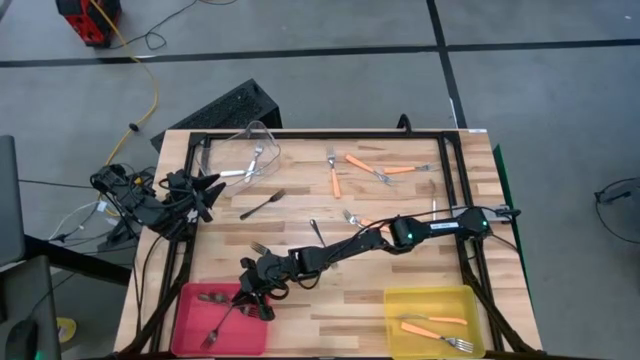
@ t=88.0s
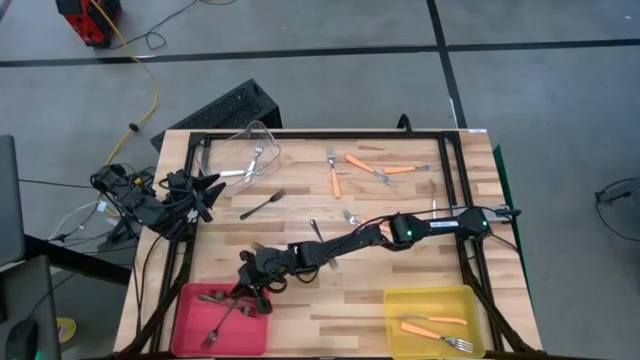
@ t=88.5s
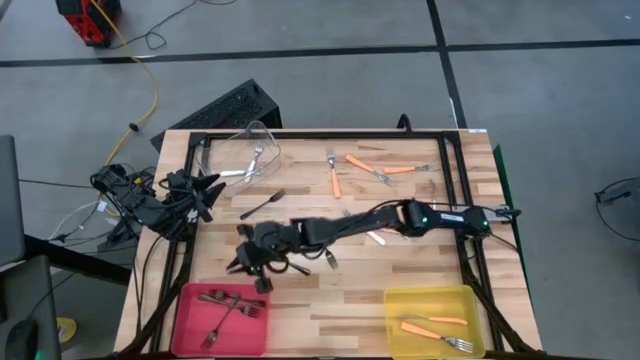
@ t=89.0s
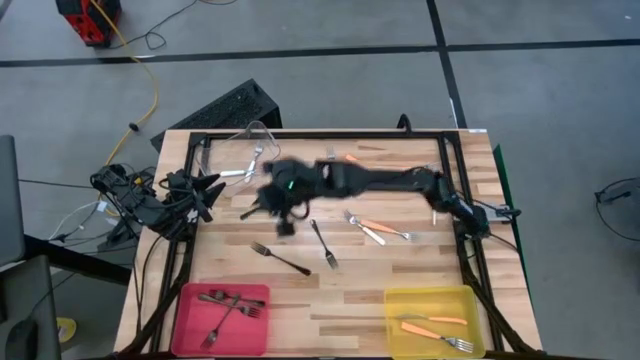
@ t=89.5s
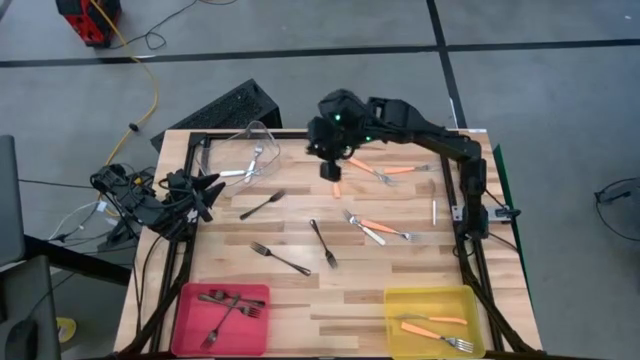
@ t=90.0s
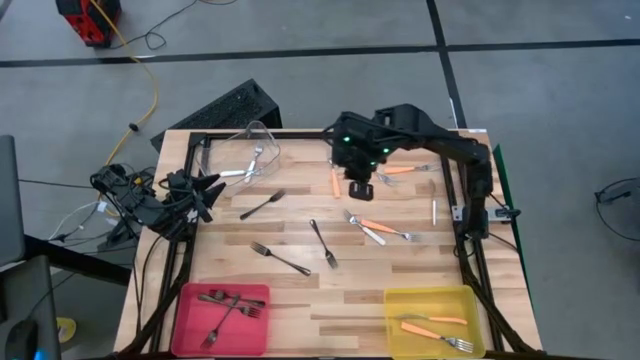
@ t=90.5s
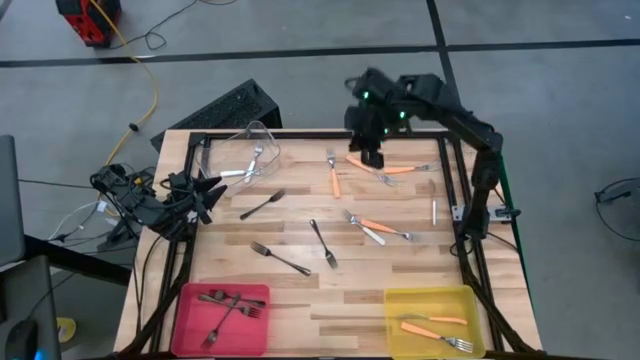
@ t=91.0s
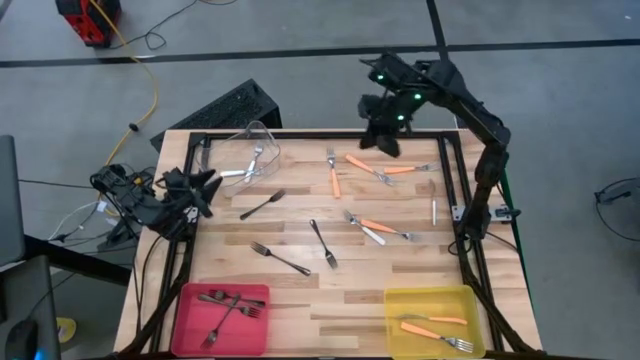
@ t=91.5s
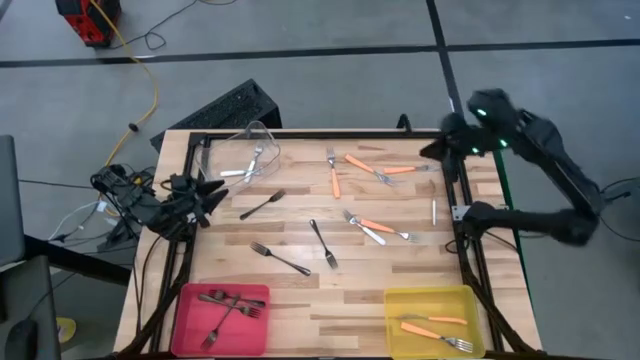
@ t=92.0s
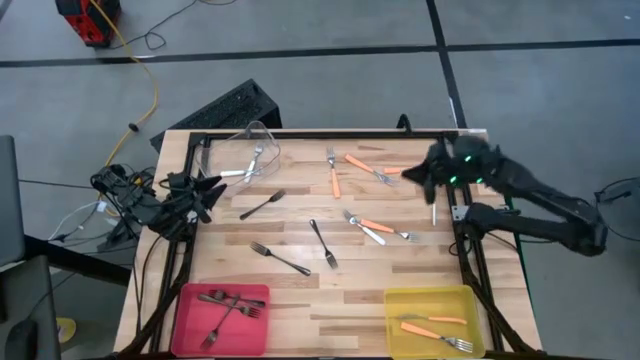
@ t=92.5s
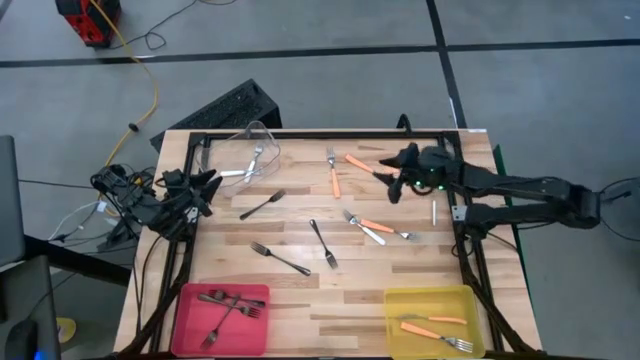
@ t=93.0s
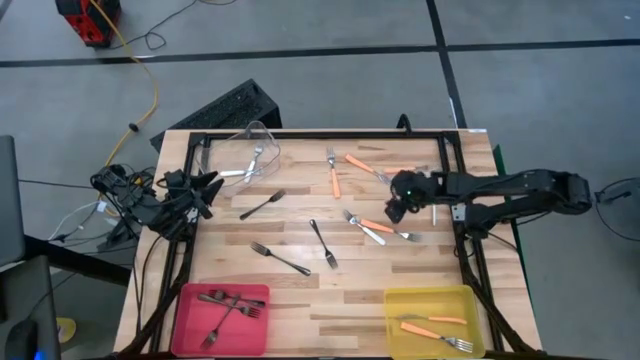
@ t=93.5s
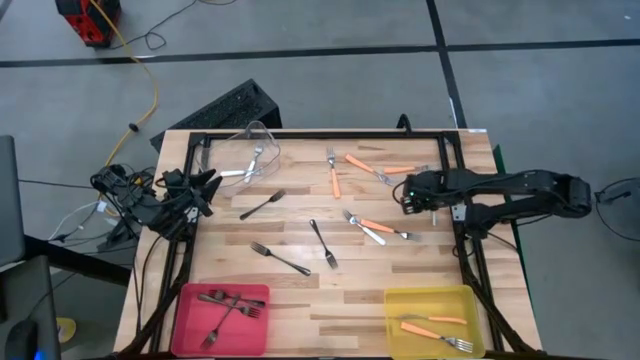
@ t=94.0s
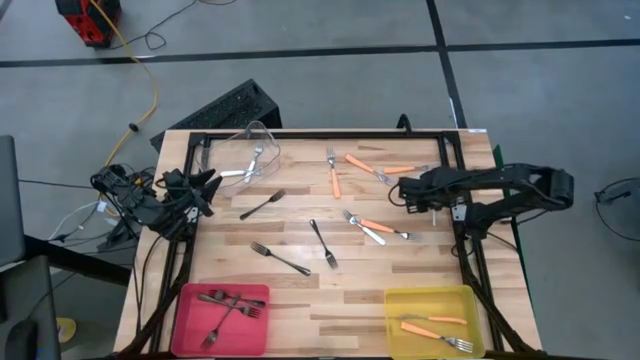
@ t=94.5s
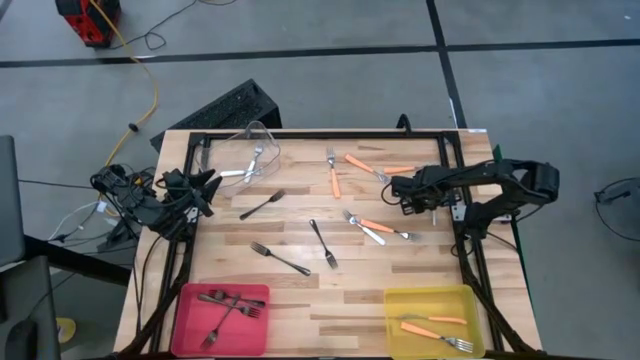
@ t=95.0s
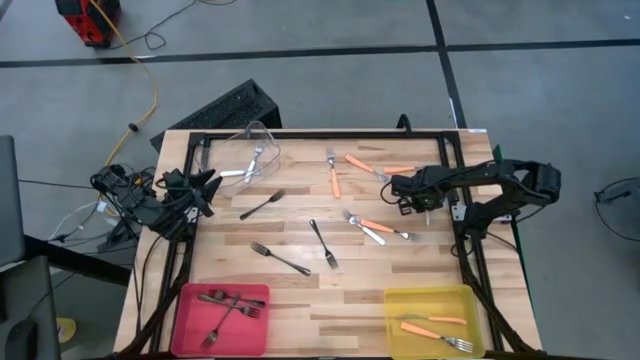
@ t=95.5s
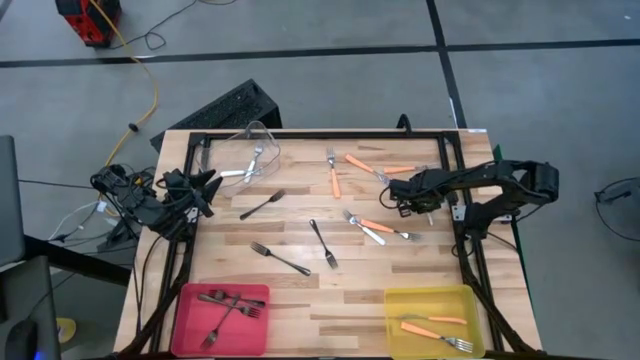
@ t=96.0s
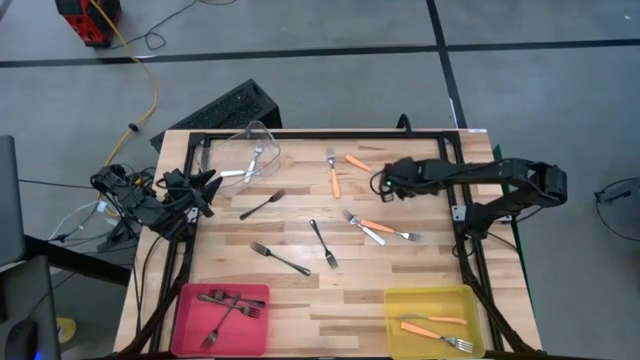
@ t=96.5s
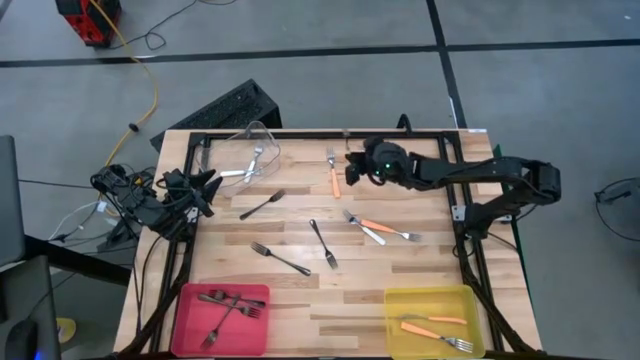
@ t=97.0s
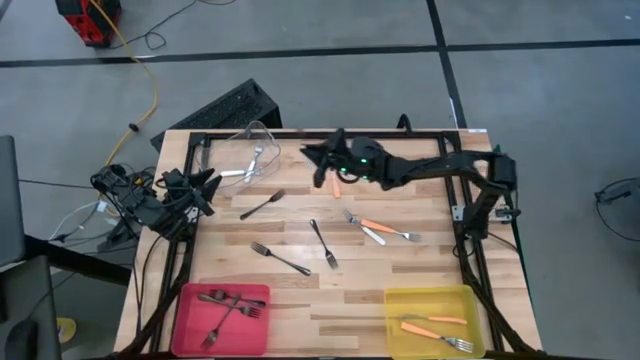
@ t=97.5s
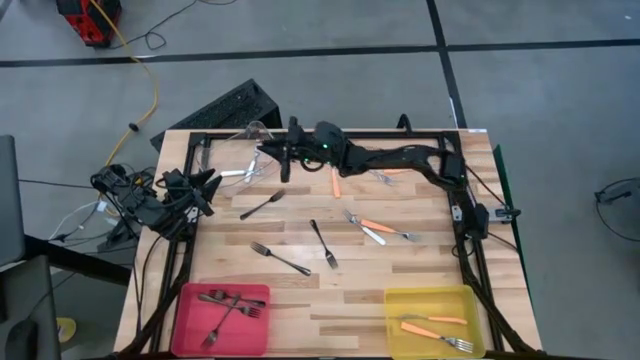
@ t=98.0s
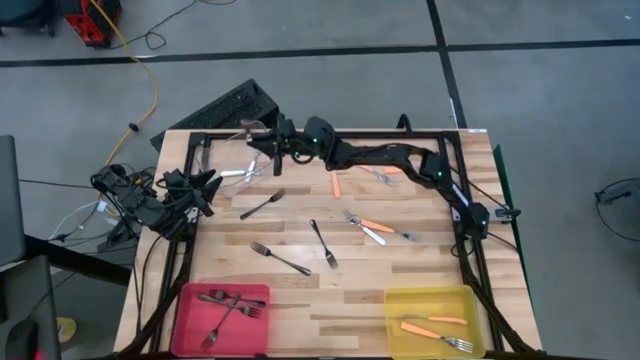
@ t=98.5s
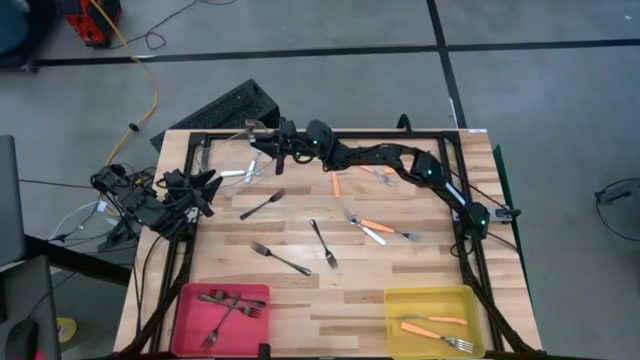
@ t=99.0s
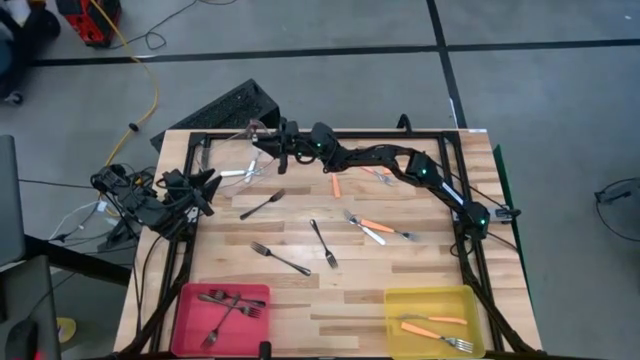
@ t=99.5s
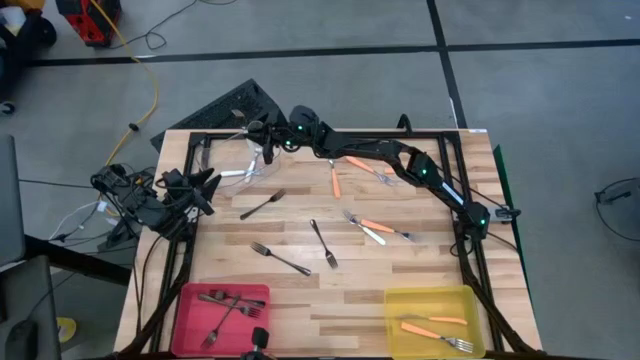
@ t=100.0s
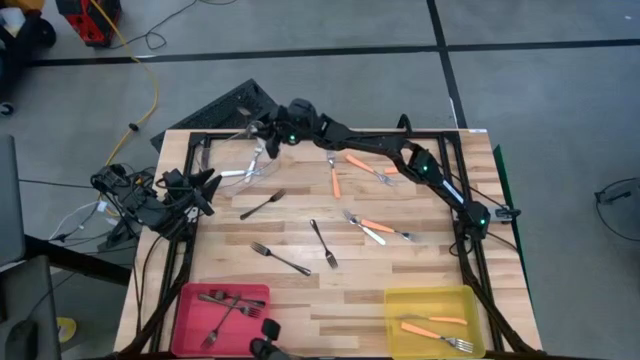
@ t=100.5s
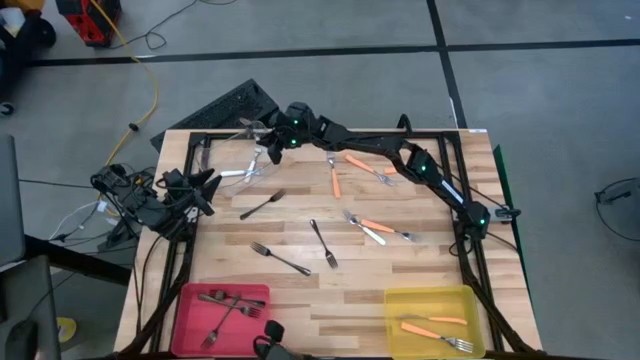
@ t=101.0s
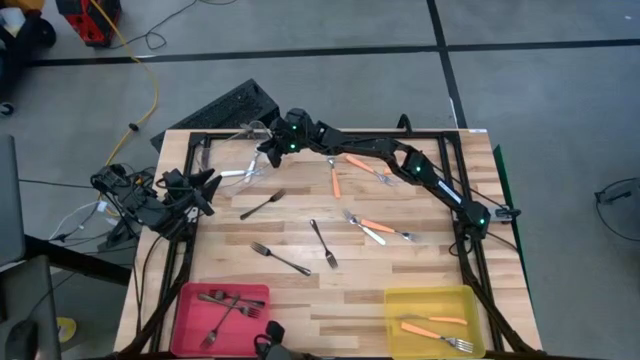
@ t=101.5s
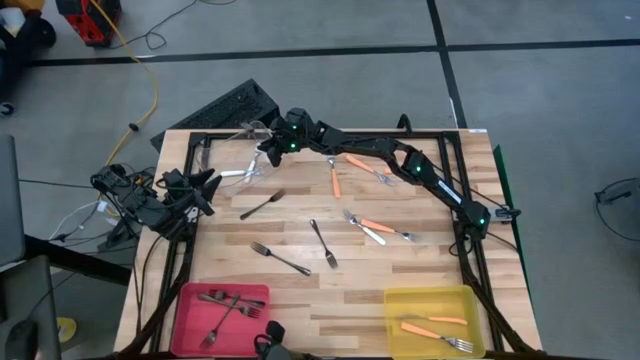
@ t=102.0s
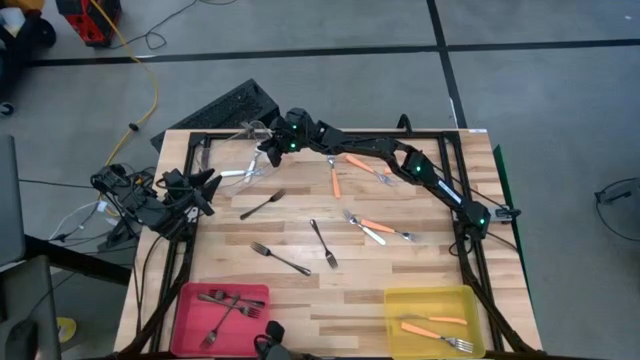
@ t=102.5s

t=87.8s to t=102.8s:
Task: Sort silverware by color (type)
Put the white fork into the transparent bin

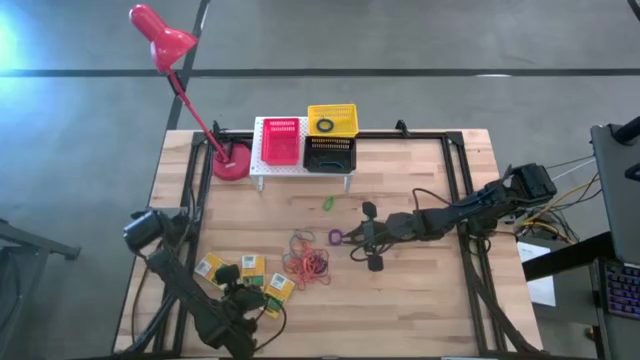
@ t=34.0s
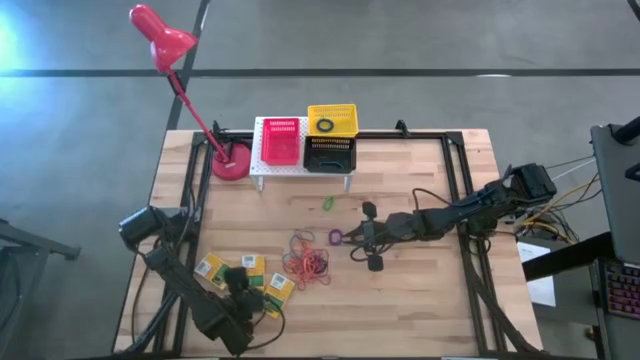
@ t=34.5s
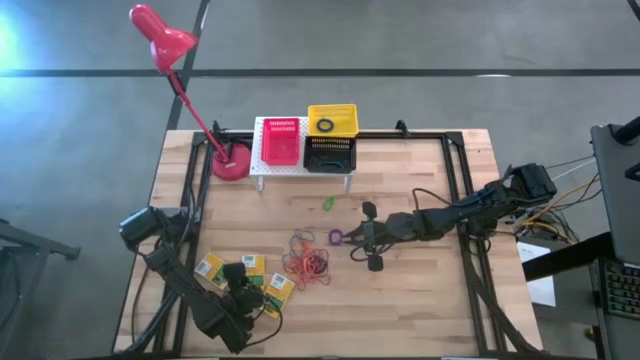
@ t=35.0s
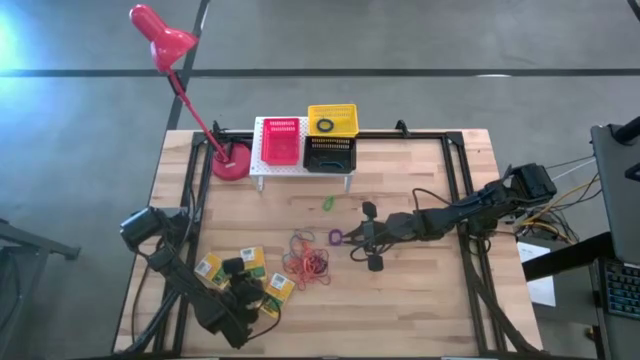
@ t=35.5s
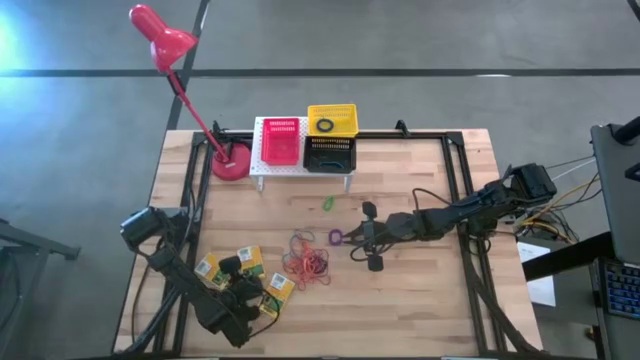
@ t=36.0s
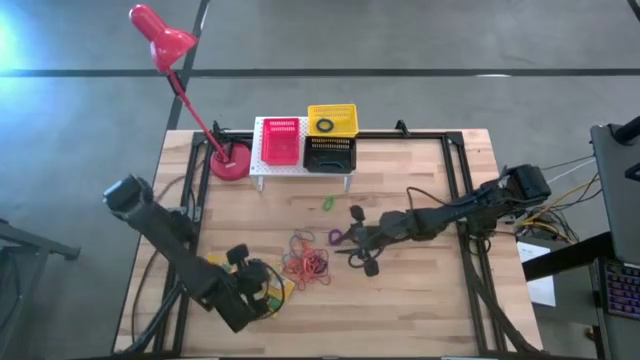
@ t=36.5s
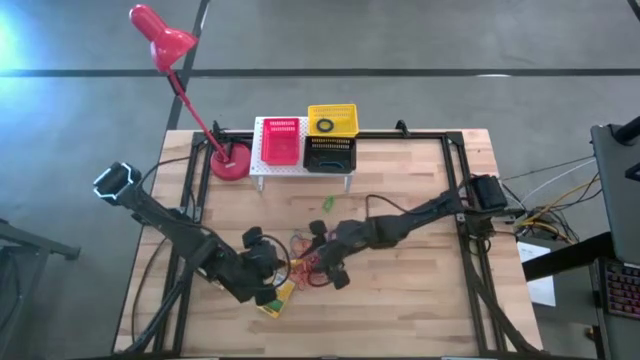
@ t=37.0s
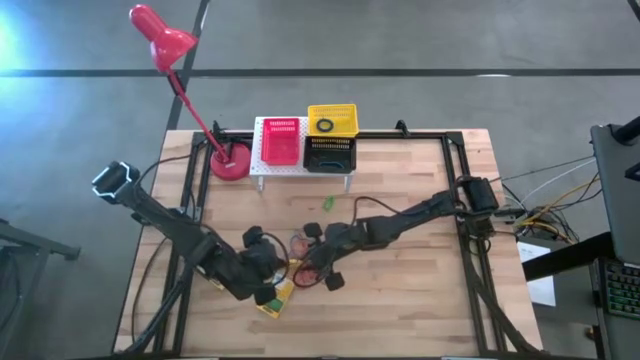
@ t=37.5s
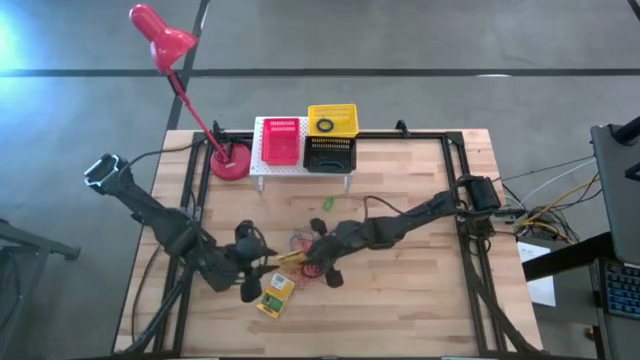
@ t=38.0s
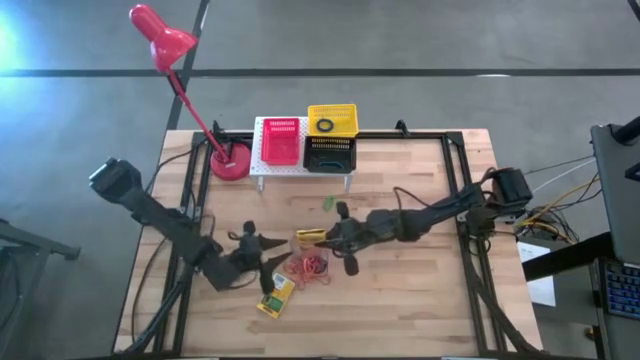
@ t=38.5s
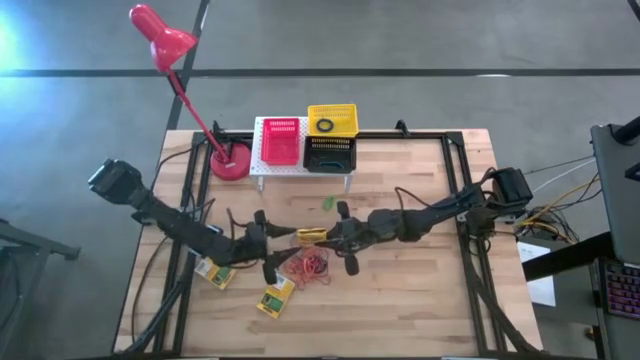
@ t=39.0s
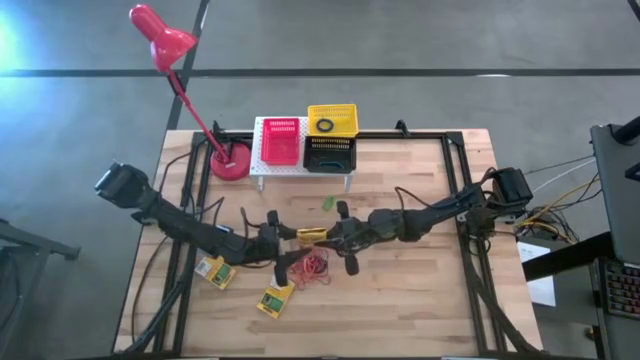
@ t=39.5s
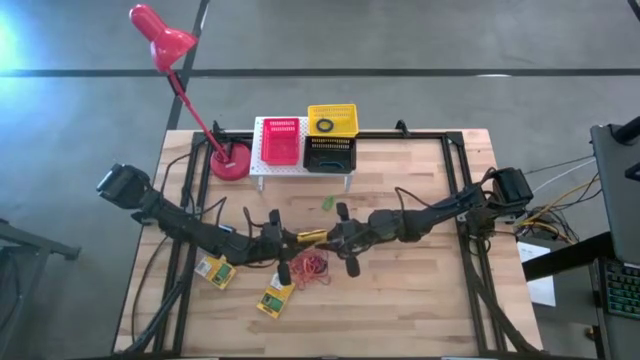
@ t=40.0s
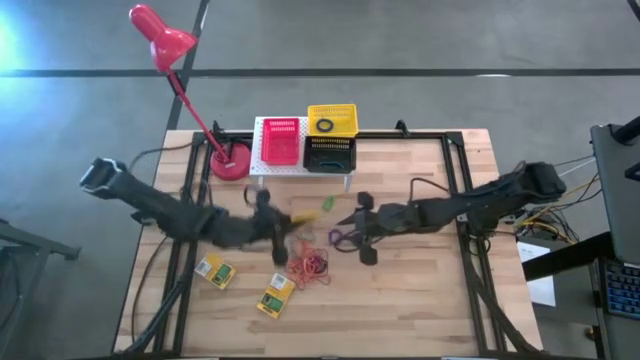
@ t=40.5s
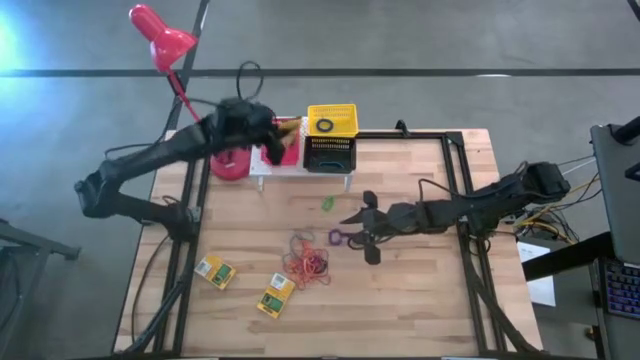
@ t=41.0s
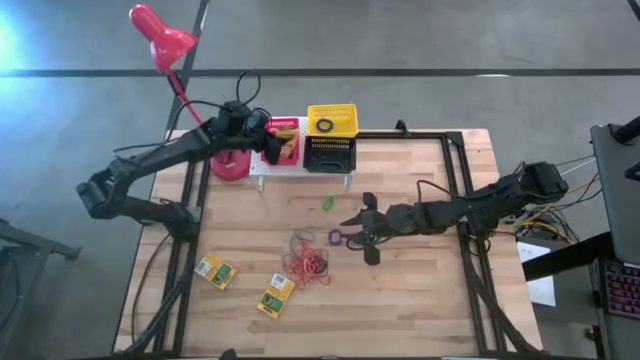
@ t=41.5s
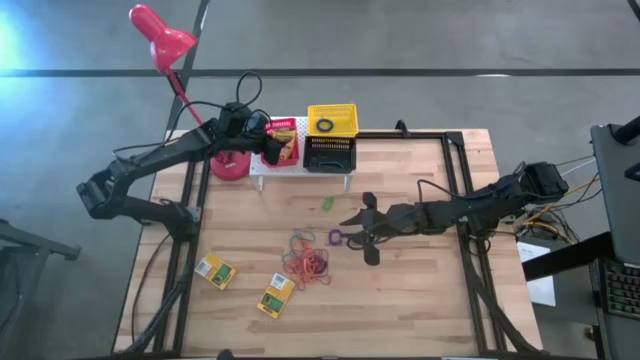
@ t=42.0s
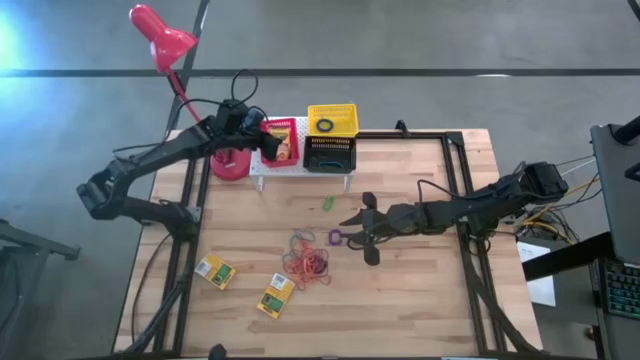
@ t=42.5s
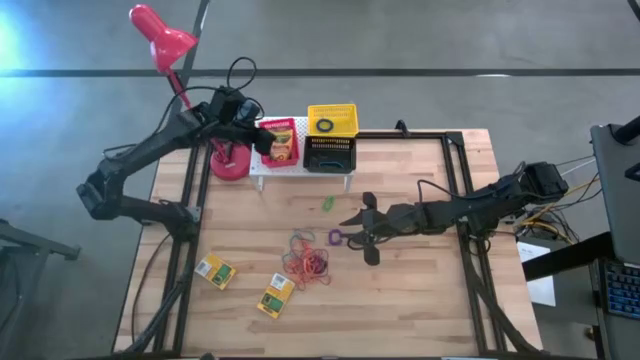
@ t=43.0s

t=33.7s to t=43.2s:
Task: Pick & Place Office Desk Supplies
Put the yellow crayon box into the red bin on the shelf
